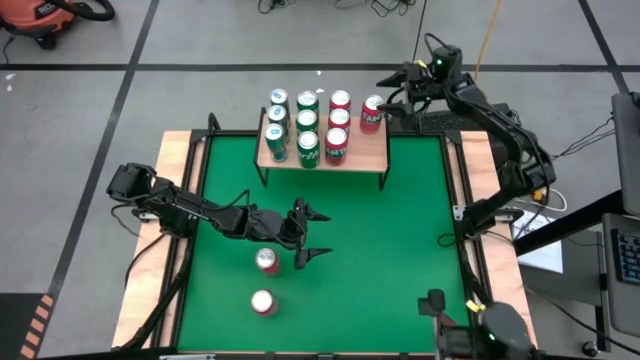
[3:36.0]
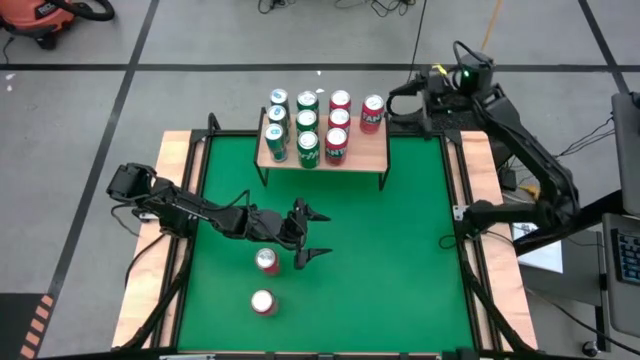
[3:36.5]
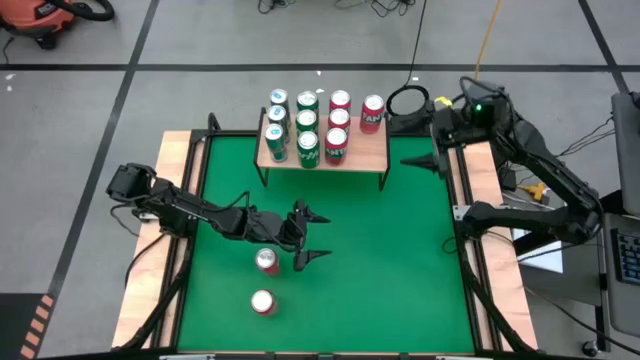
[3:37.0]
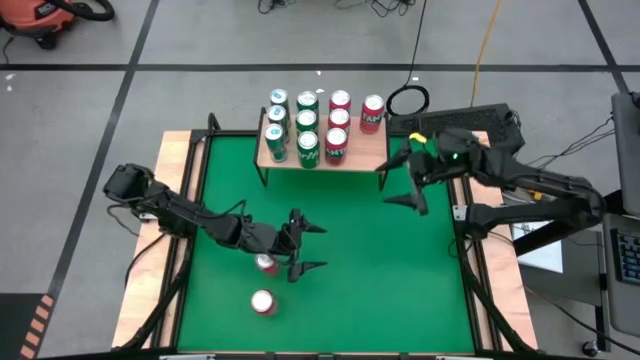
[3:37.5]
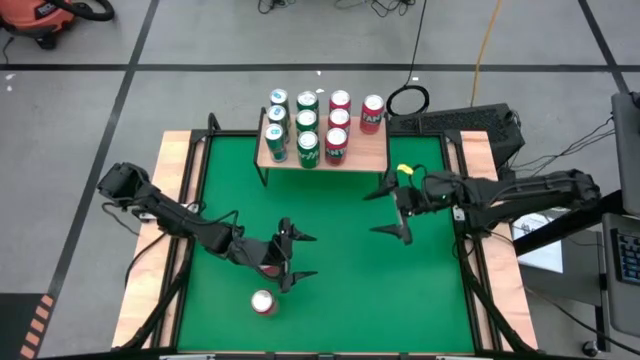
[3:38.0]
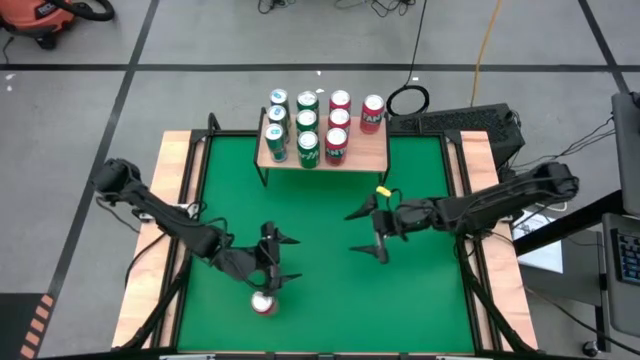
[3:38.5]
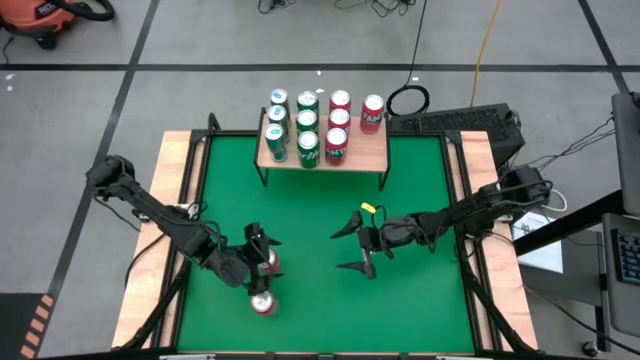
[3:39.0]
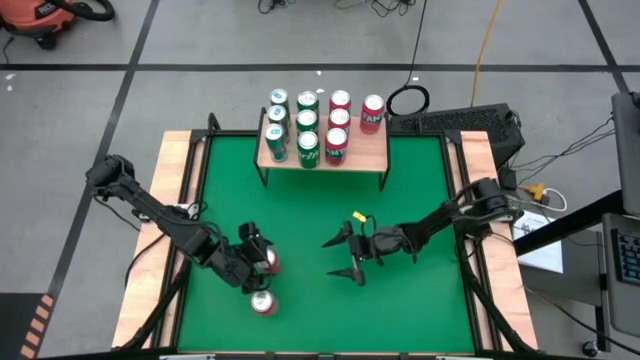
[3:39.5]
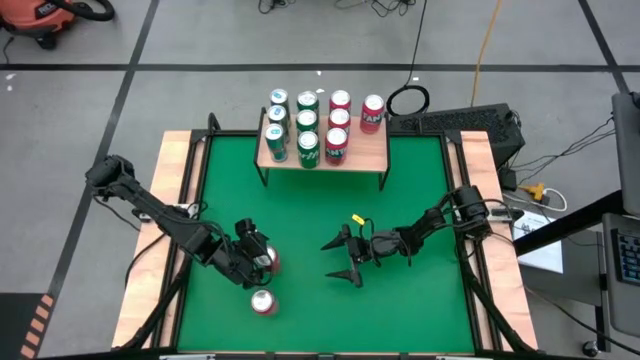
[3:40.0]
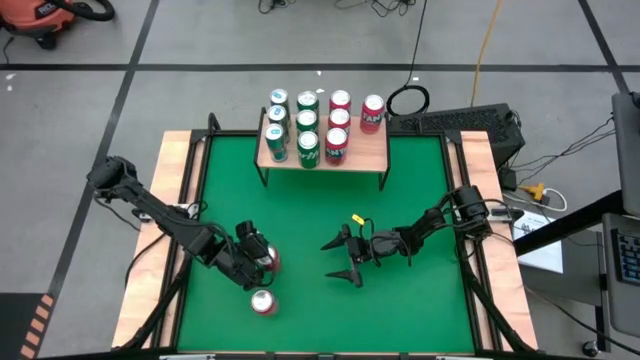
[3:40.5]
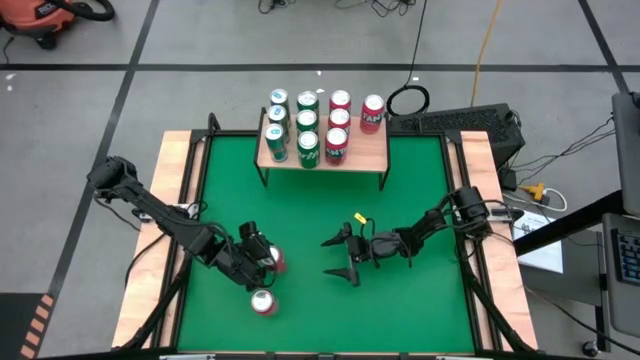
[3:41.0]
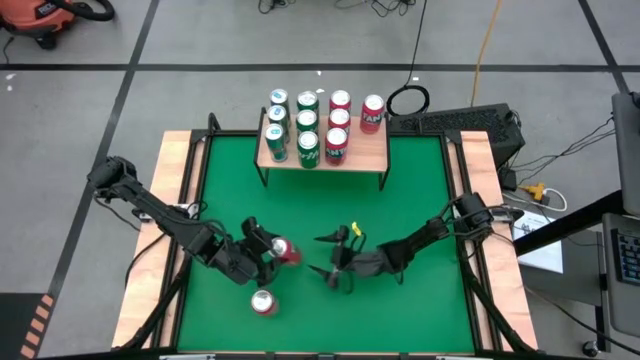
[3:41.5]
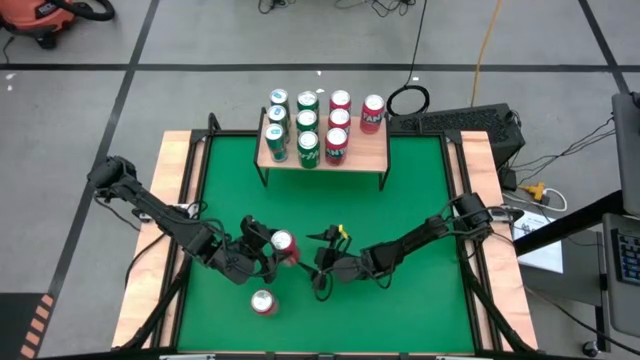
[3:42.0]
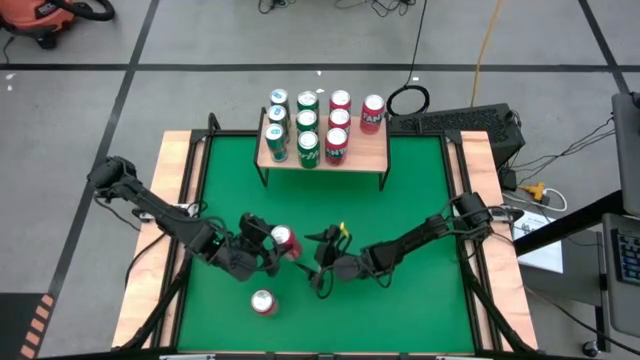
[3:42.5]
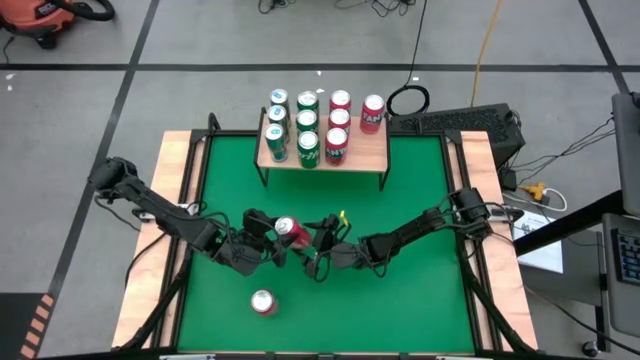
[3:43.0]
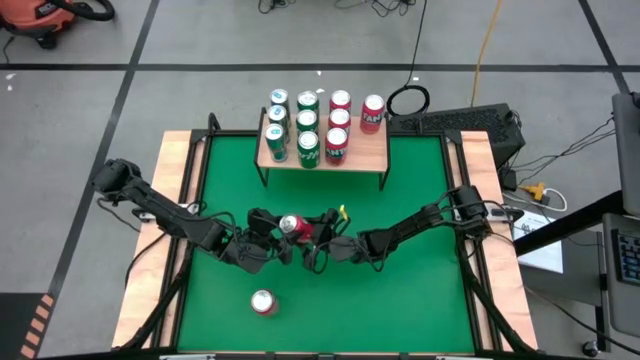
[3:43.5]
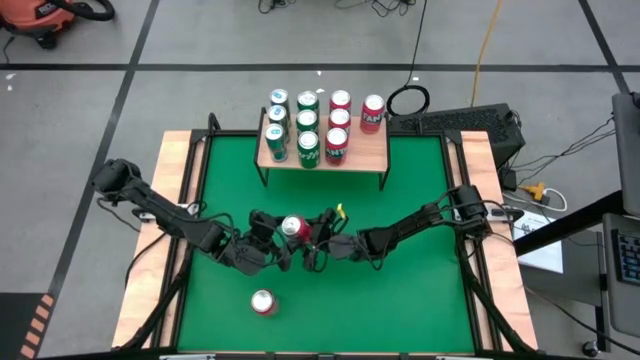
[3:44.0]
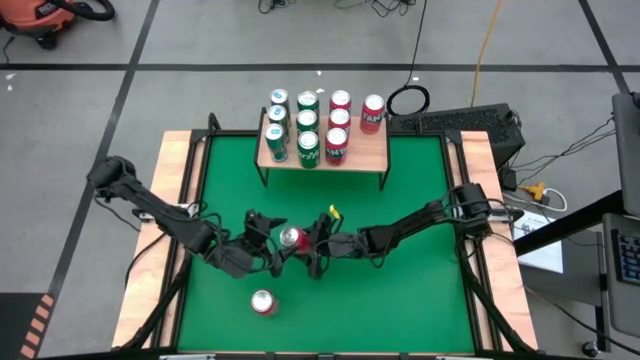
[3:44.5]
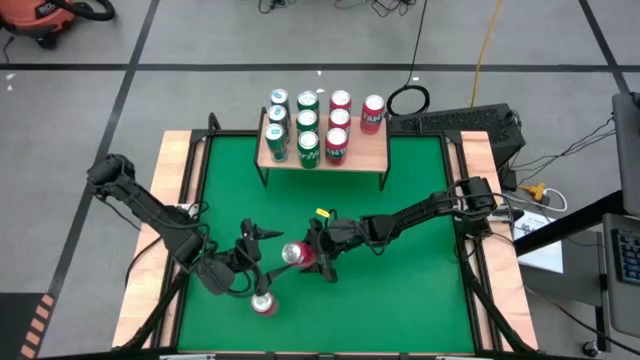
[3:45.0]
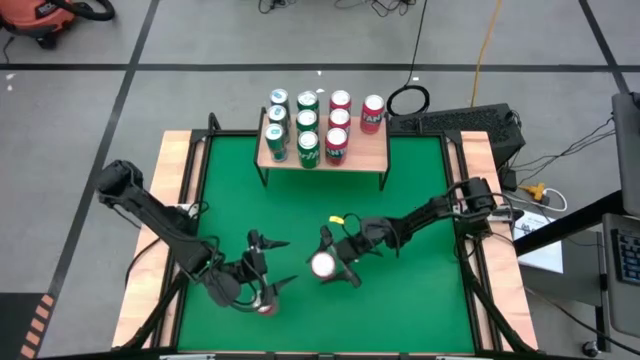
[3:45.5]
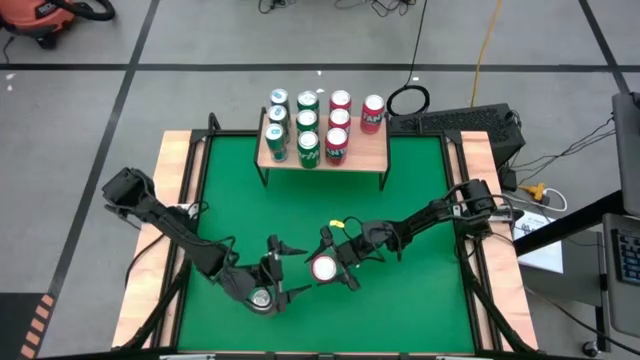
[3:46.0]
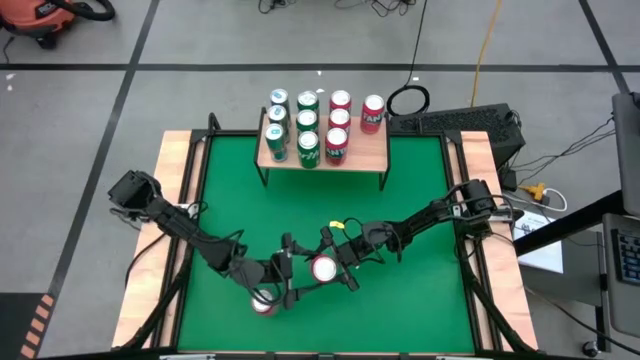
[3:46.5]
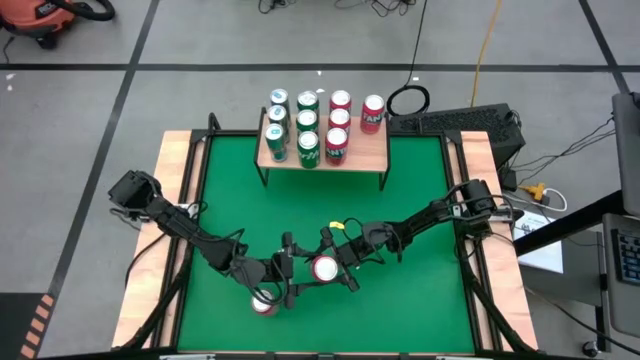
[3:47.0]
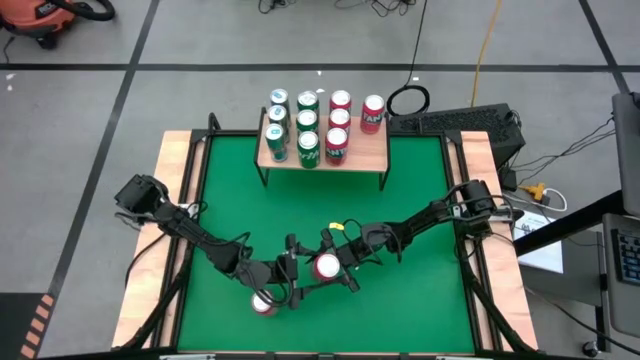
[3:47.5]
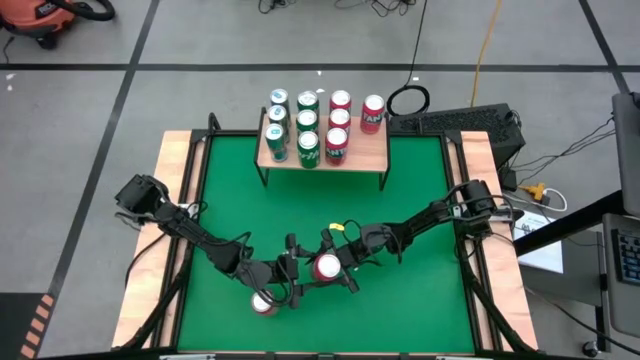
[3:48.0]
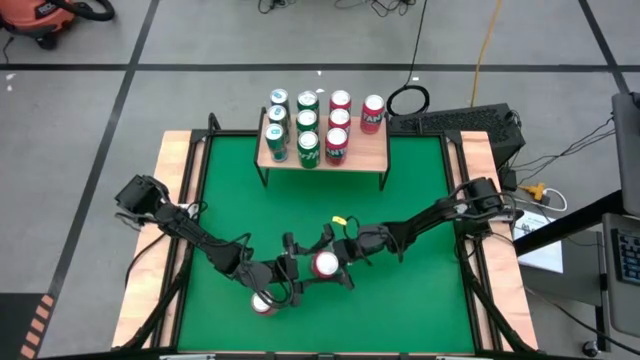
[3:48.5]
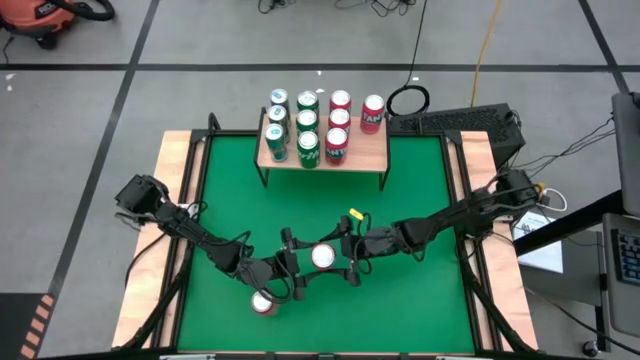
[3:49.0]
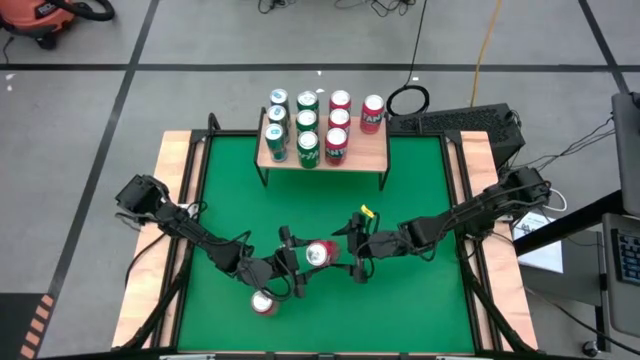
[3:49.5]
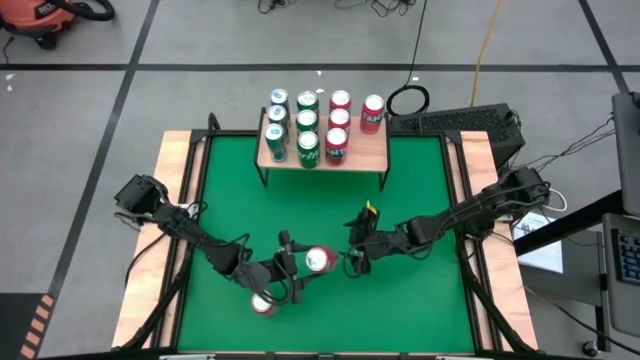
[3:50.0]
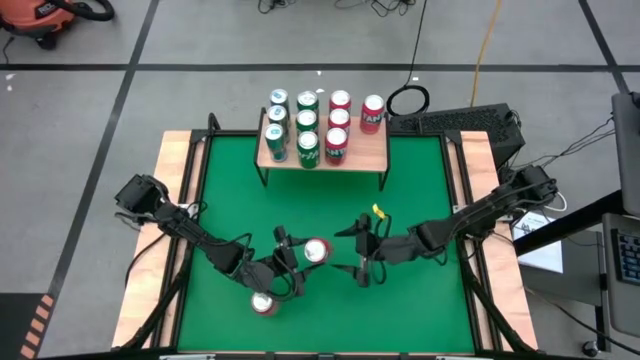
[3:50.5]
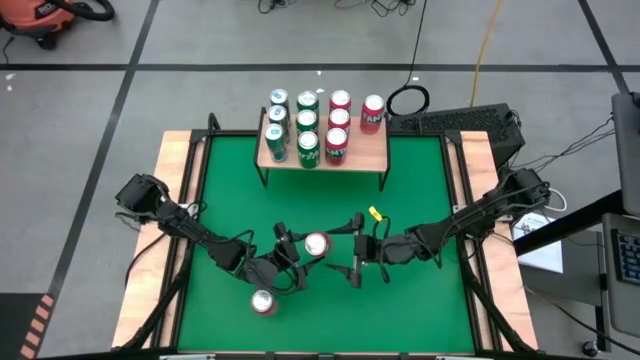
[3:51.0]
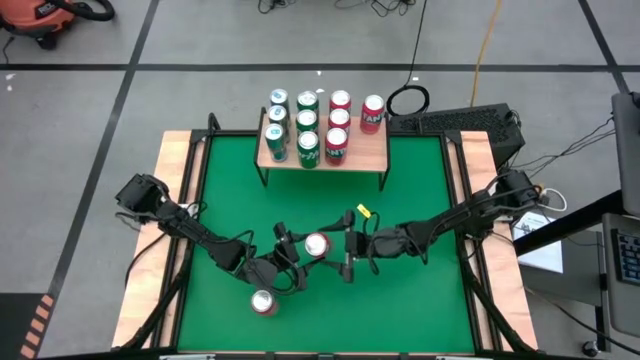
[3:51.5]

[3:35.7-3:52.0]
Task: Place canned beverage on shelf
Put the orange soda can on the shelf aligned with the other orange soda can

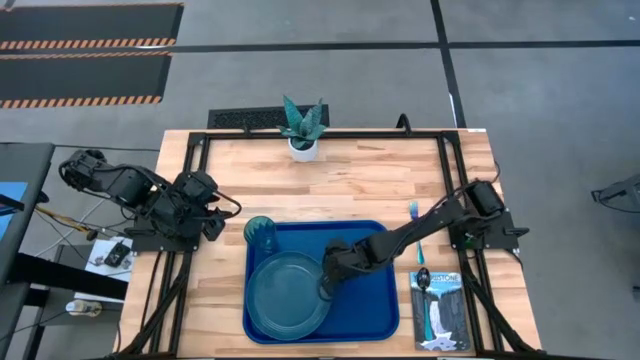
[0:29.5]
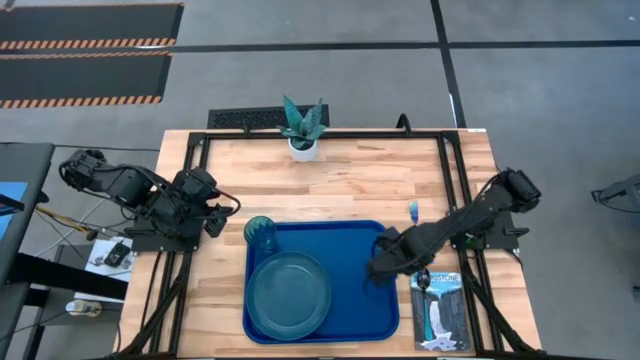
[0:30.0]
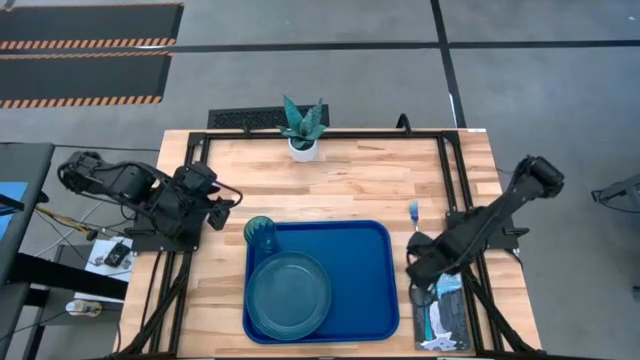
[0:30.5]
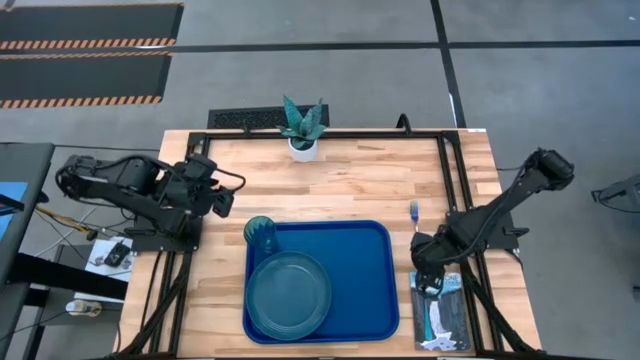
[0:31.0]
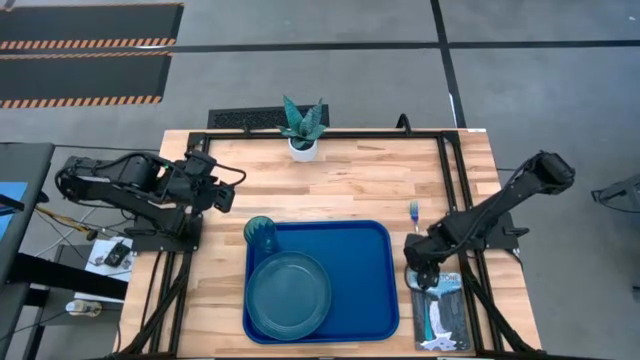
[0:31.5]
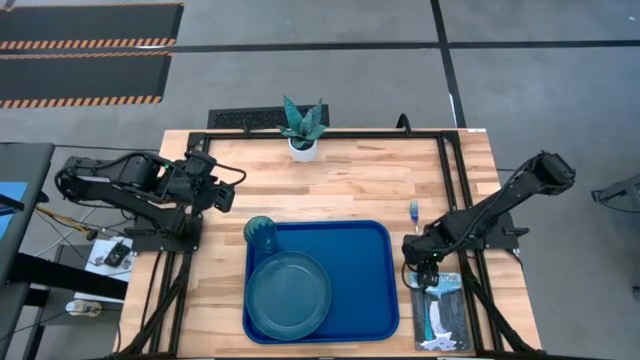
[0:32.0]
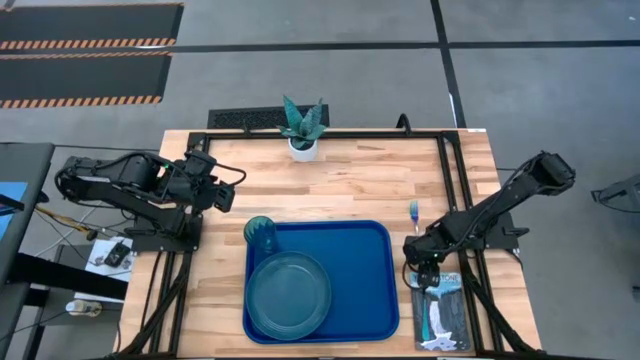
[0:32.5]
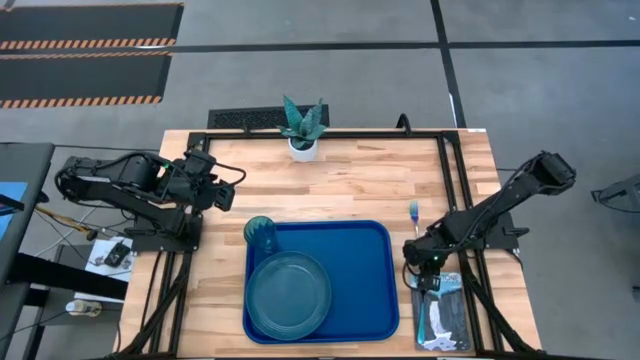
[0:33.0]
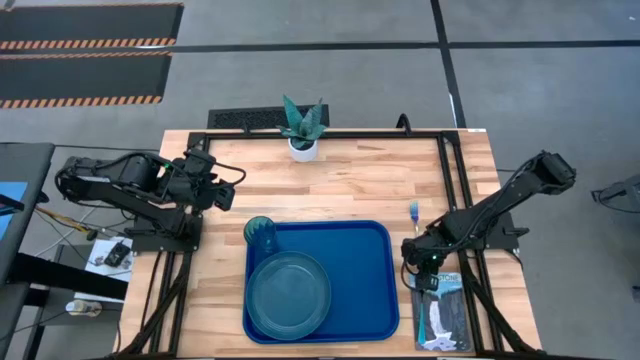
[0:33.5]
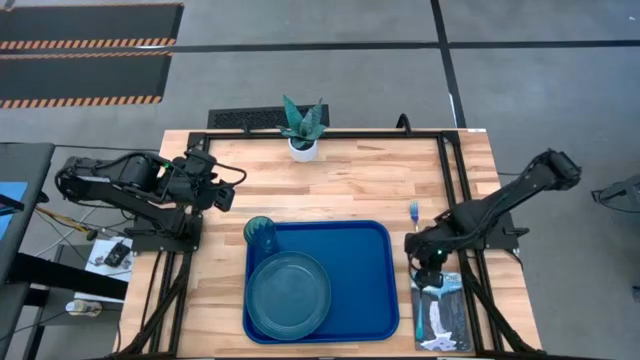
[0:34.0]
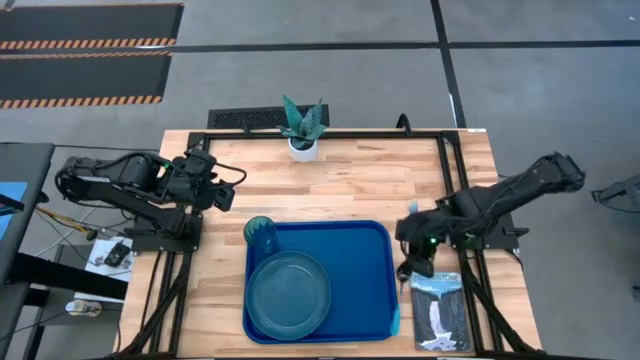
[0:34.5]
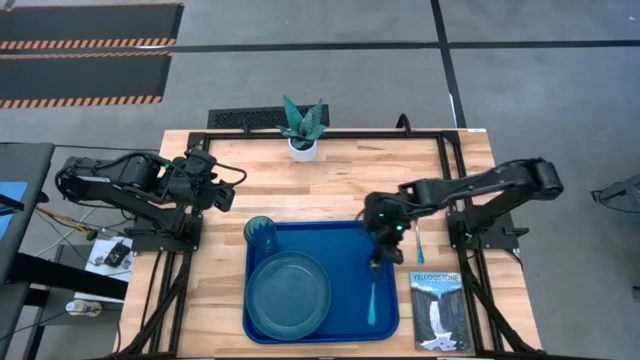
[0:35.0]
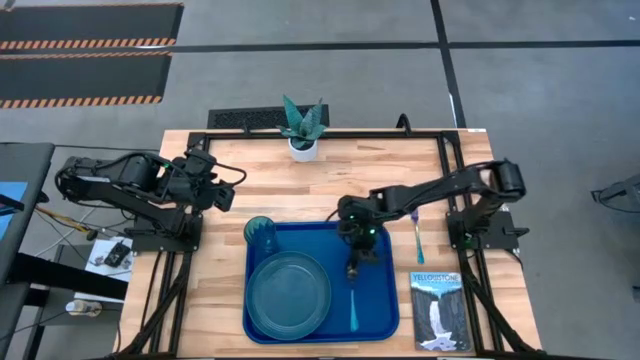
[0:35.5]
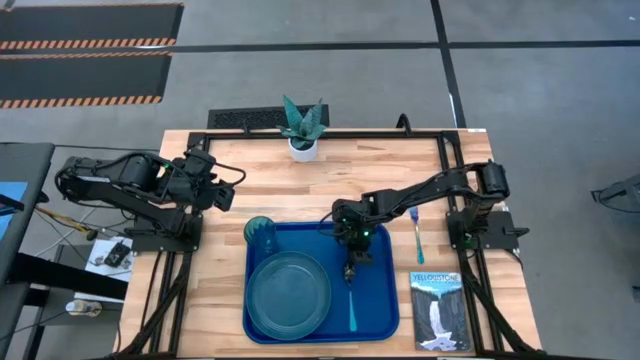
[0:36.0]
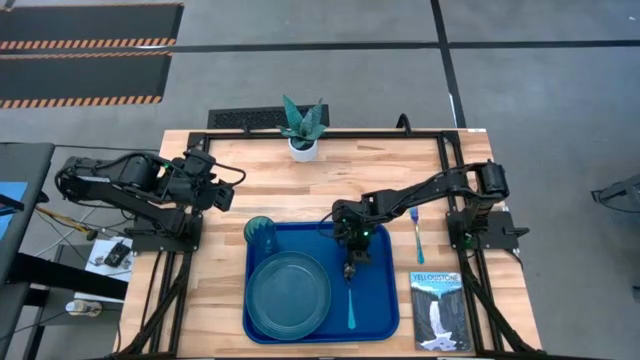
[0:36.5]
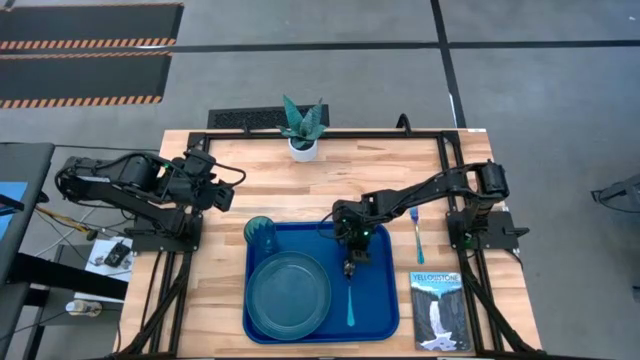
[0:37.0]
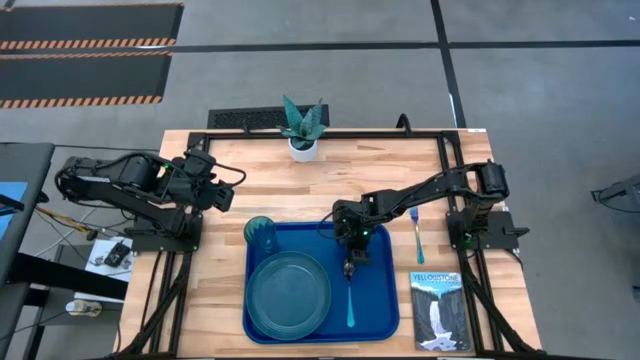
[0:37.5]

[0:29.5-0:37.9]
Task: Pick and place plate/cup/fork/spoon on tray
Put the blue spoon on the blue tray to the right of the blue plate
